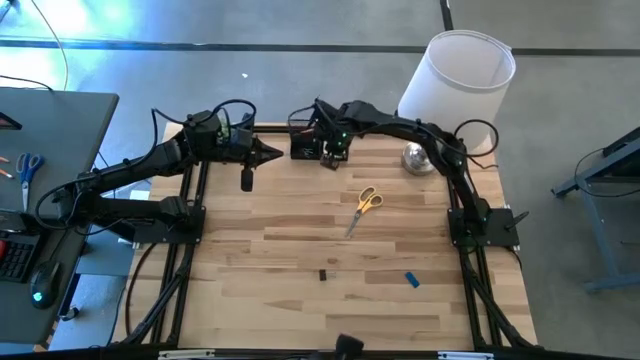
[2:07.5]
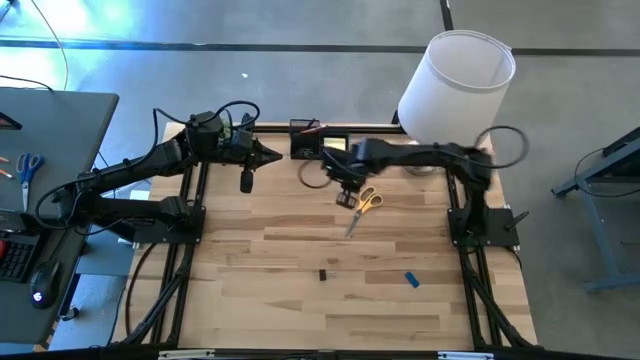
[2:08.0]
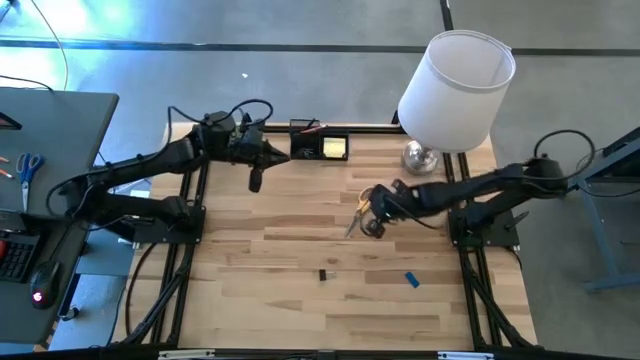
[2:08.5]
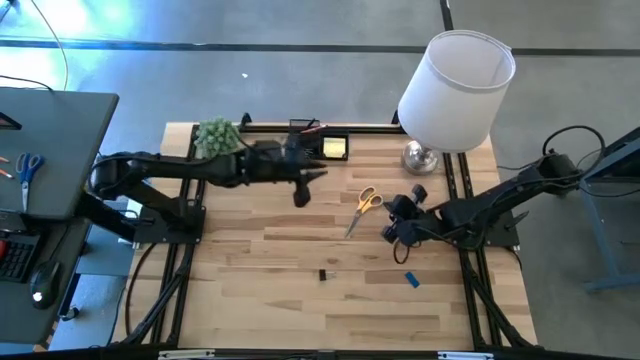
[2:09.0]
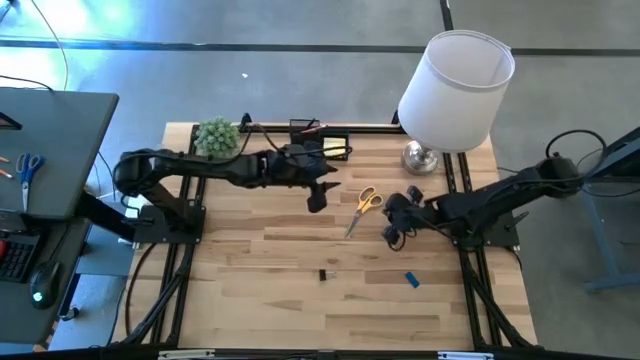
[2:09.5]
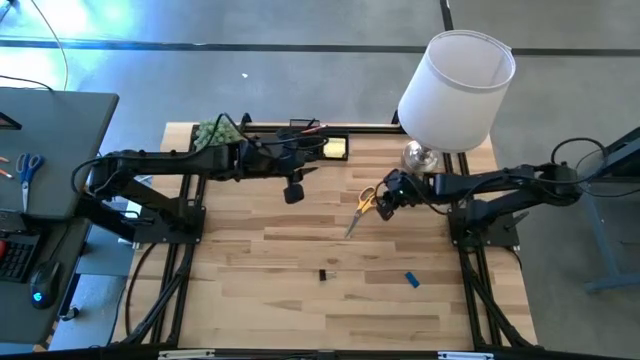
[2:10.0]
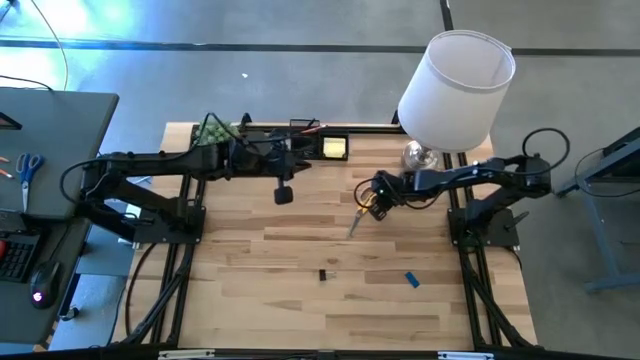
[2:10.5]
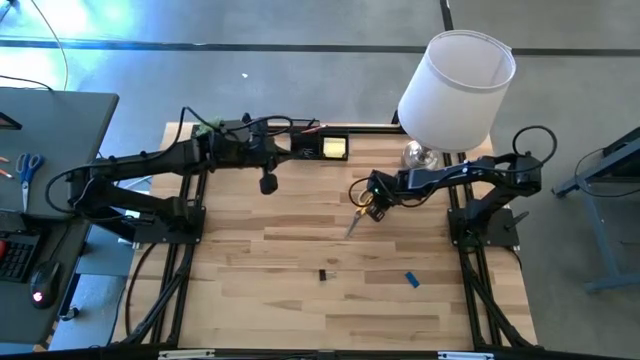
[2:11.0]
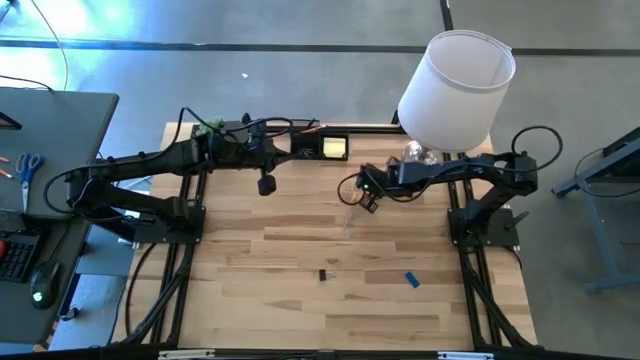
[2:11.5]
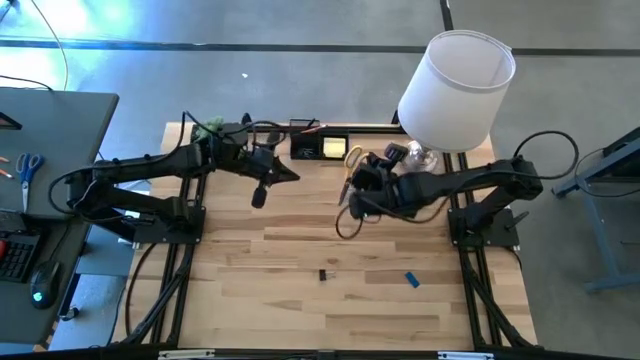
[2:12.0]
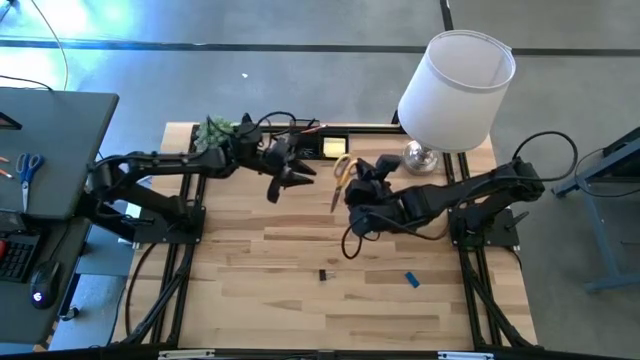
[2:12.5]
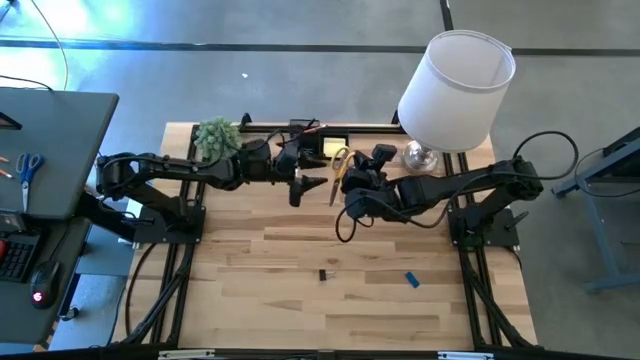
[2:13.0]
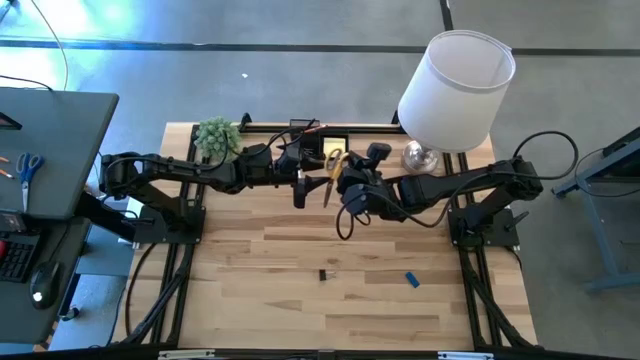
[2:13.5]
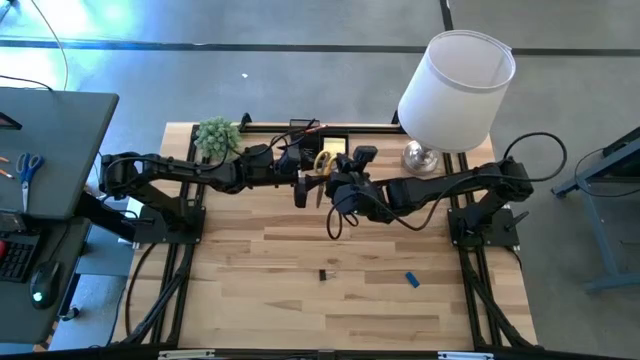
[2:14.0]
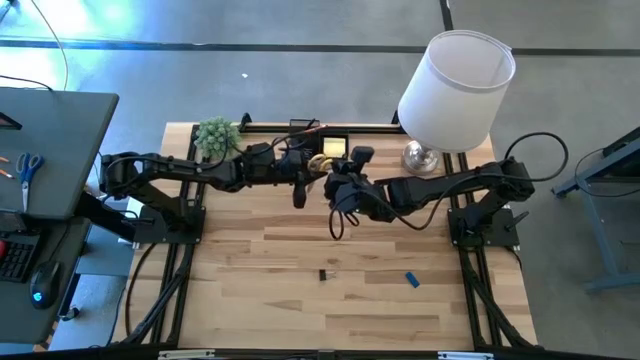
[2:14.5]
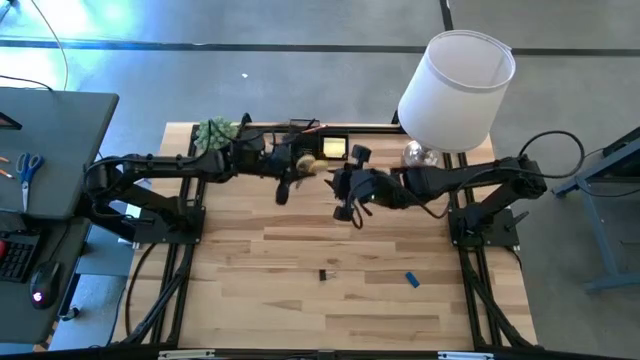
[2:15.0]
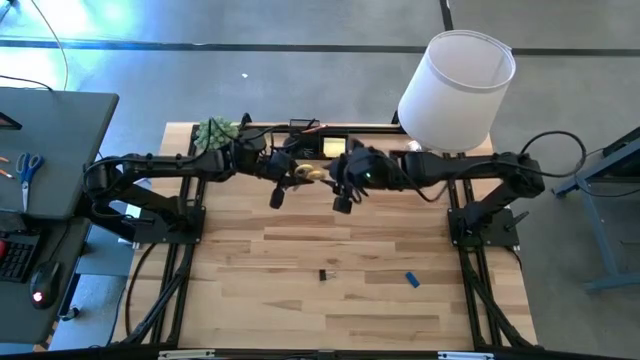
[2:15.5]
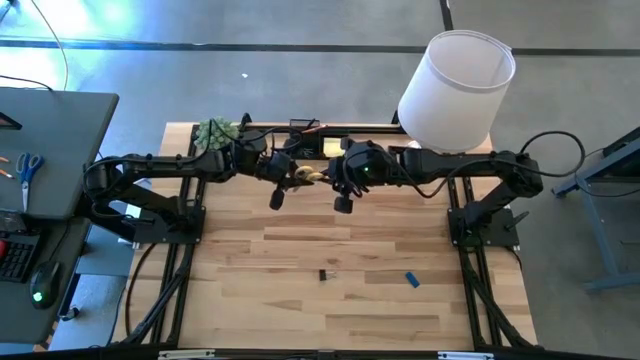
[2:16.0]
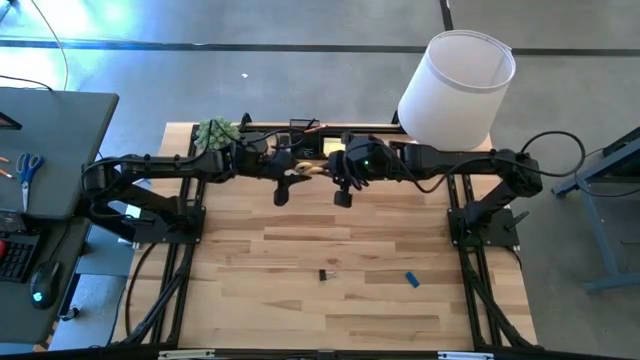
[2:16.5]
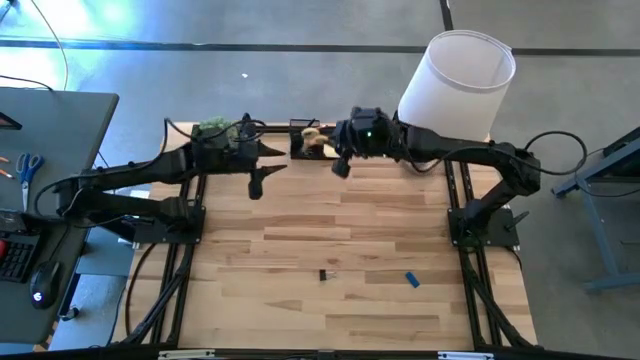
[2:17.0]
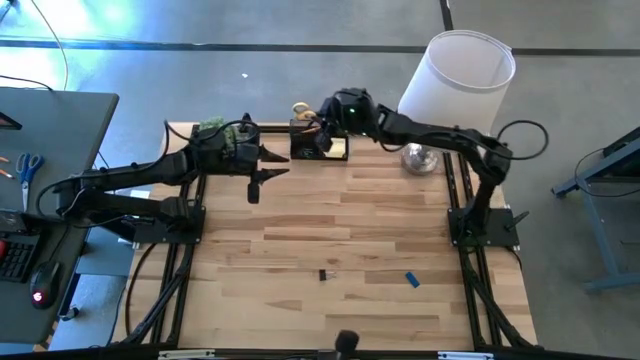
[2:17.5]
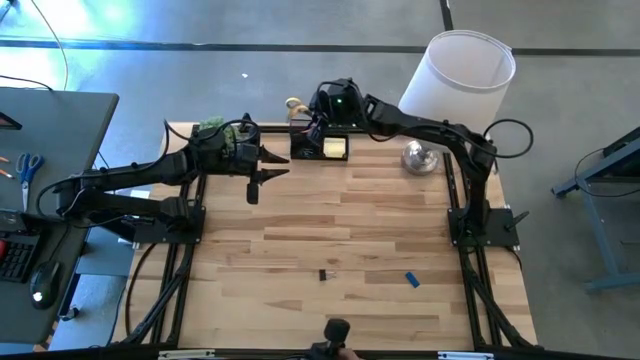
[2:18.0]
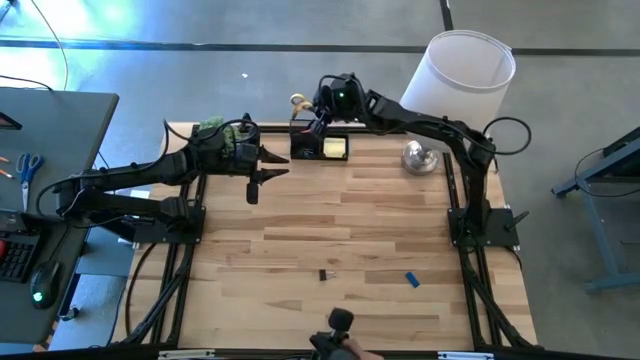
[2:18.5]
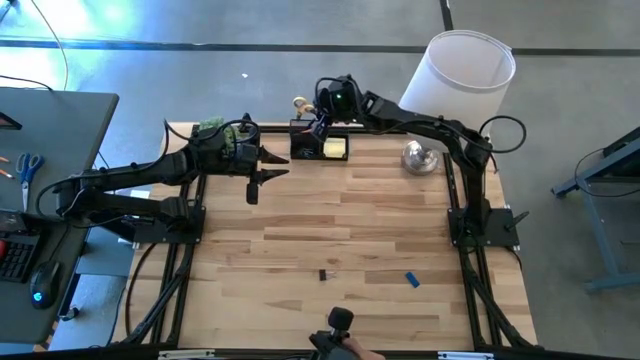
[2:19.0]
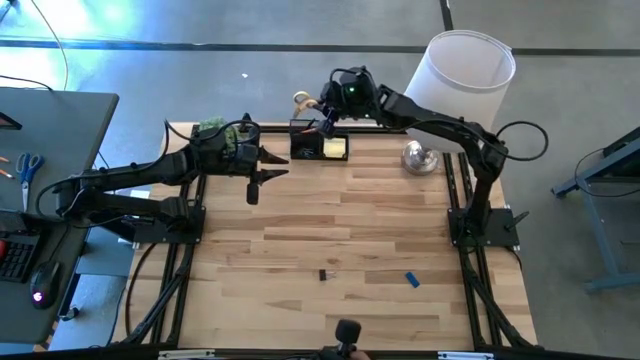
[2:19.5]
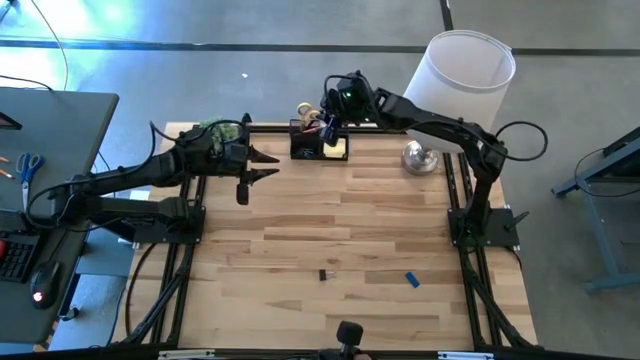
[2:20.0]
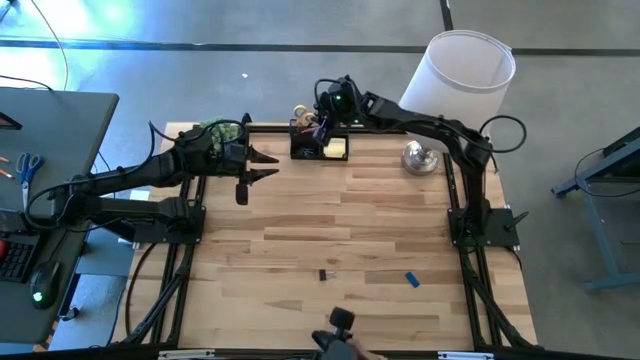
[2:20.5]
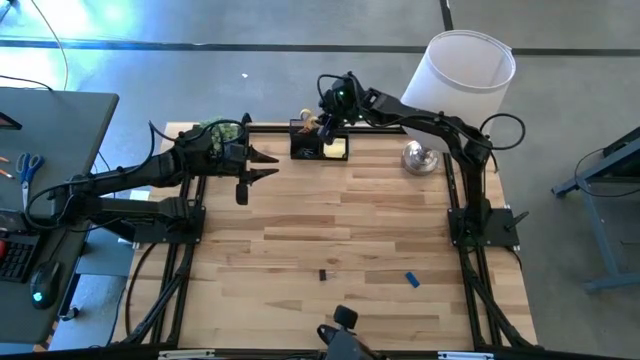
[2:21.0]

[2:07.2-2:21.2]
Task: Pick and place office supplies into organizer
Put the scissor into the top left slot of the desk organizer

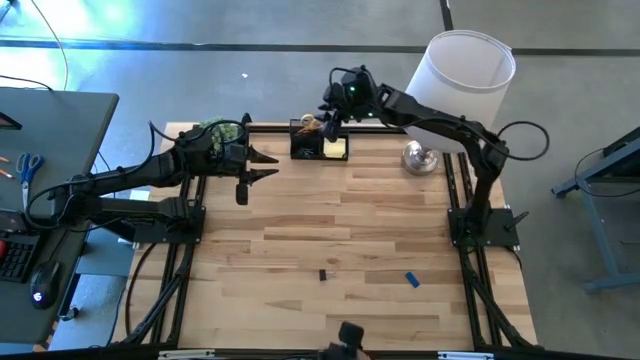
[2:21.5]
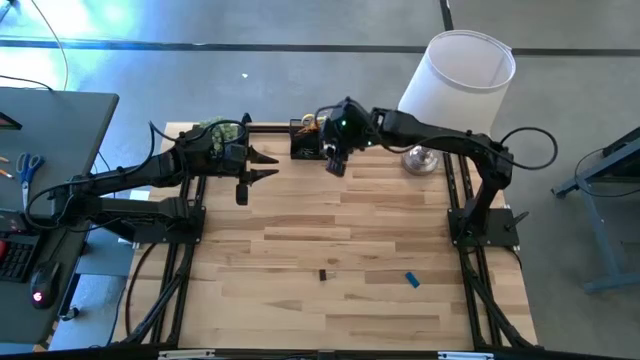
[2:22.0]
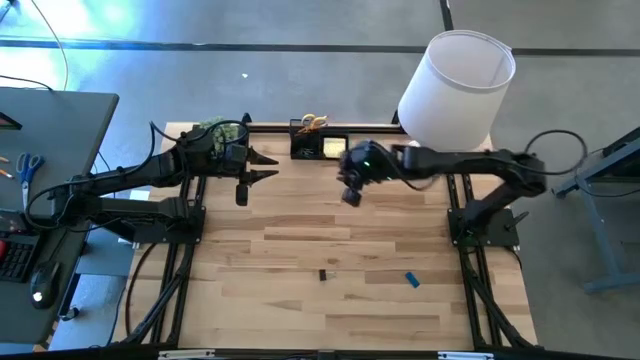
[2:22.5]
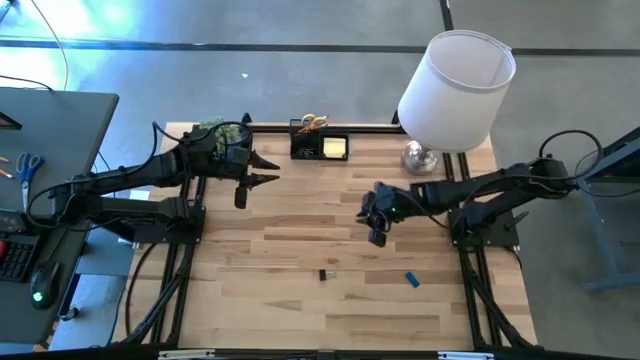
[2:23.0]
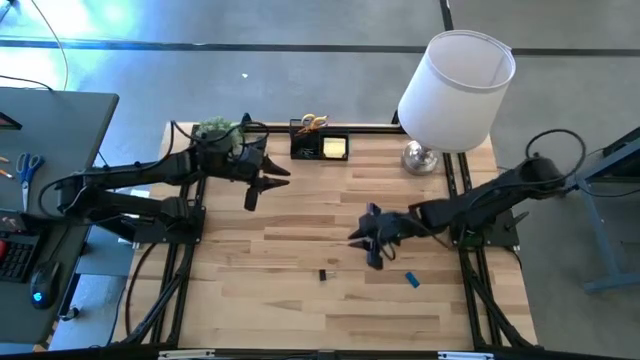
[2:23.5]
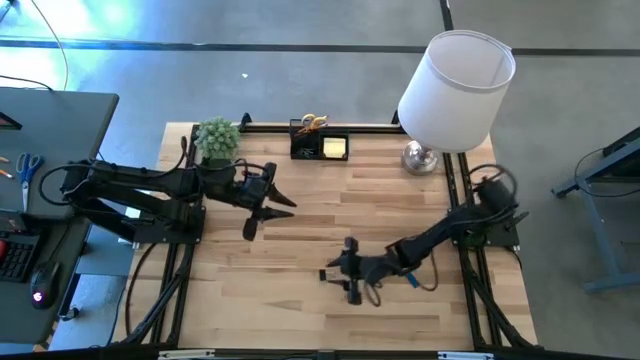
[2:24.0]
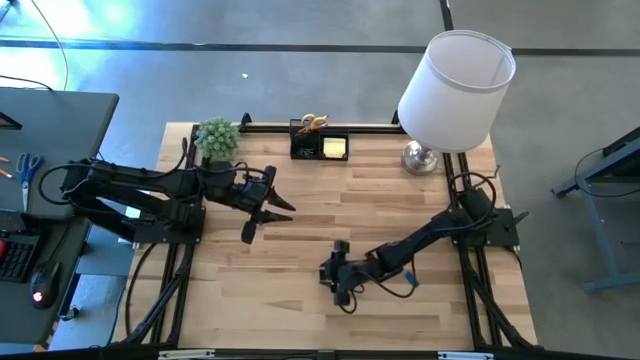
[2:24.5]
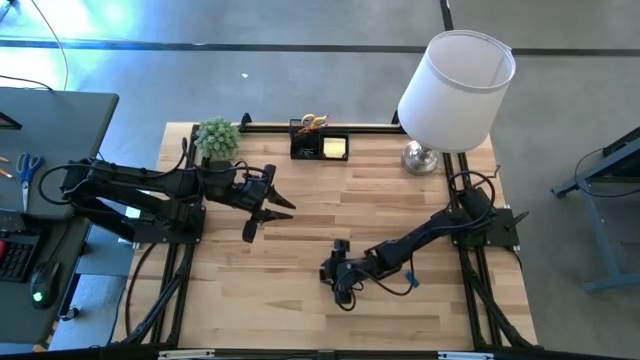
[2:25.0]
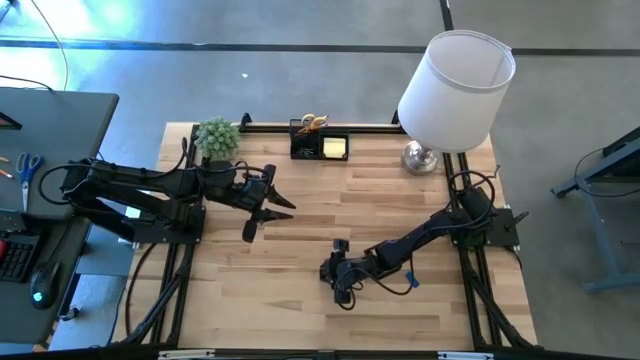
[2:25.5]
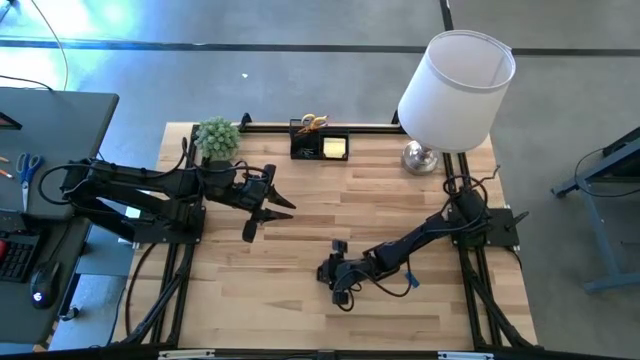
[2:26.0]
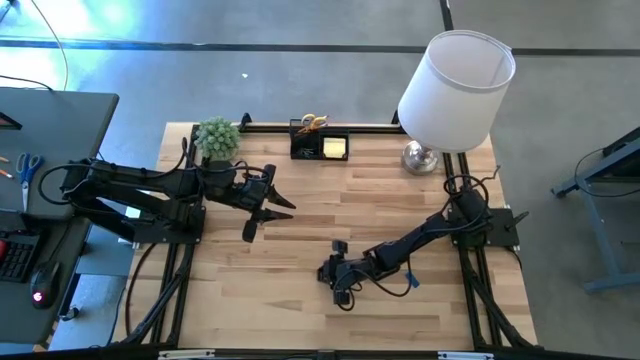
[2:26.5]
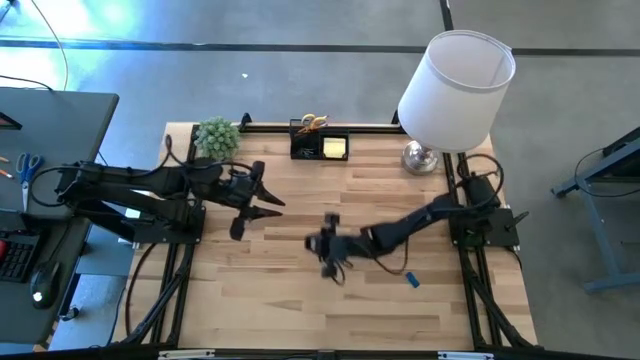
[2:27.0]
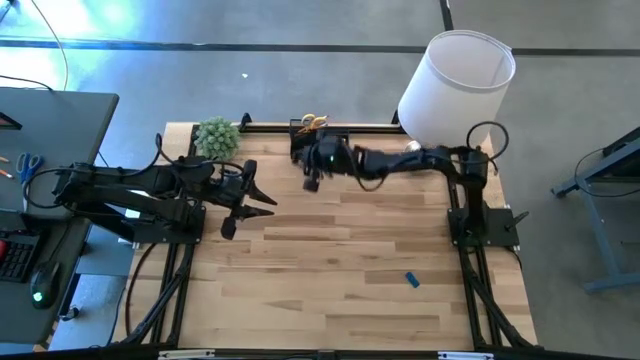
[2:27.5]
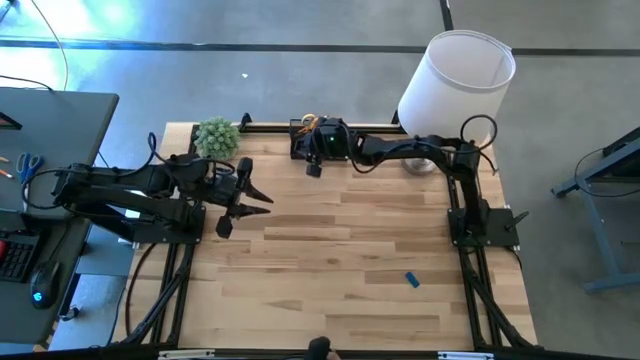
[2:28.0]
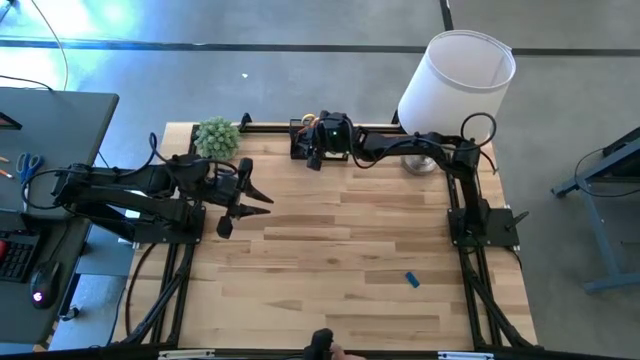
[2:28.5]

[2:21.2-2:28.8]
Put the black binder clip into the bottom left slot of the desk organizer

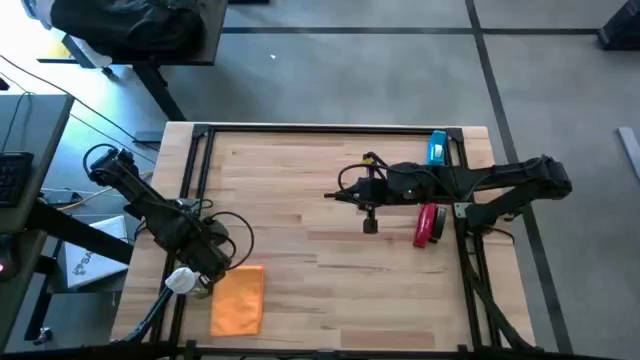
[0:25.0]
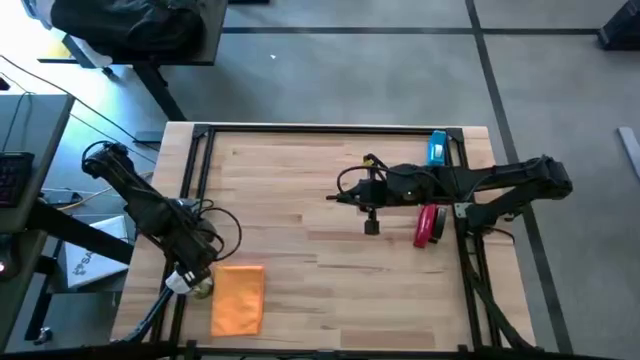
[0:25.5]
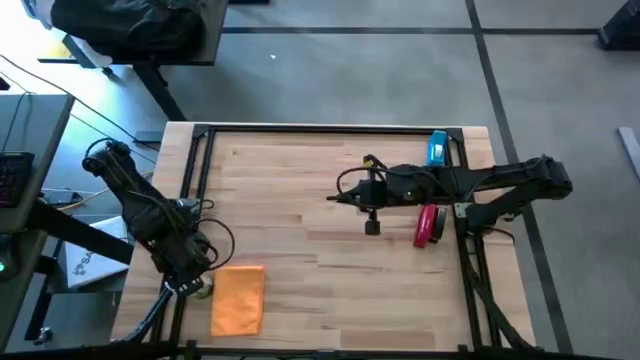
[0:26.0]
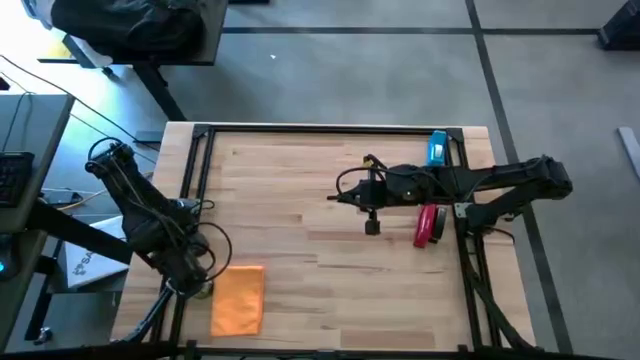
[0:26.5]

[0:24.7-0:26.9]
Task: Apply microfiber cloth
Spray the black cellphone using the spray bottle
